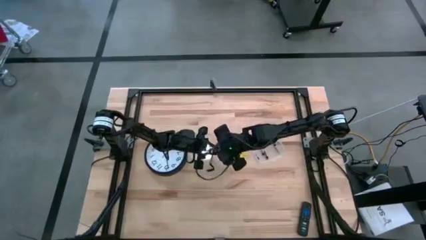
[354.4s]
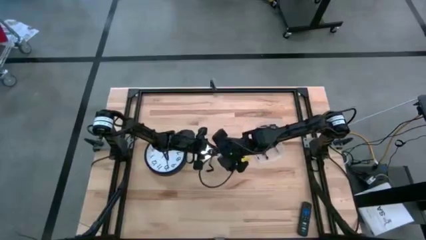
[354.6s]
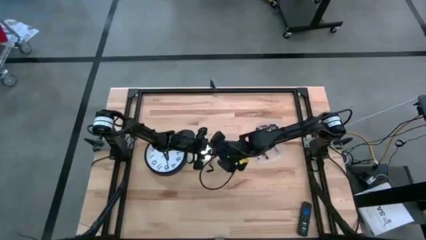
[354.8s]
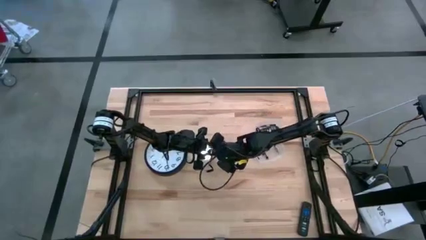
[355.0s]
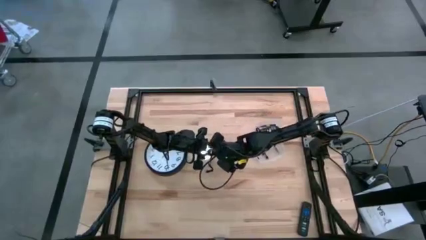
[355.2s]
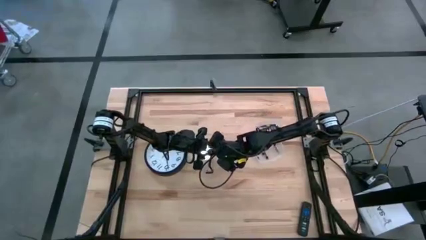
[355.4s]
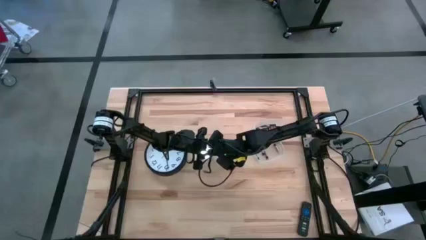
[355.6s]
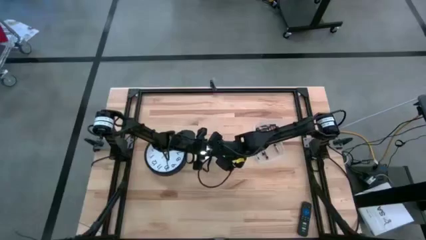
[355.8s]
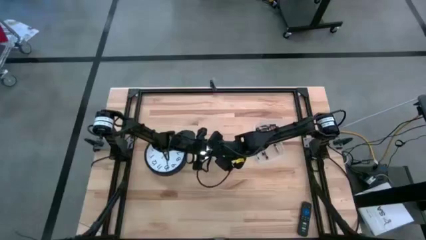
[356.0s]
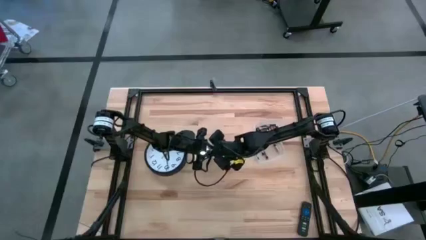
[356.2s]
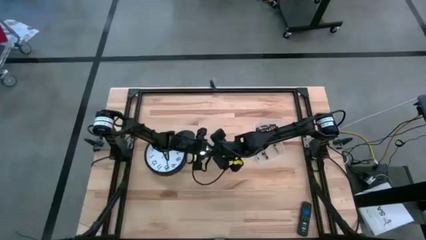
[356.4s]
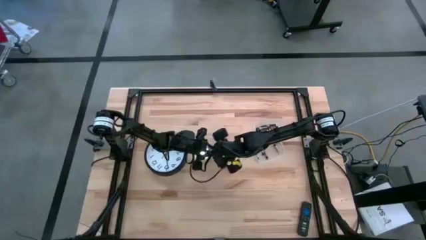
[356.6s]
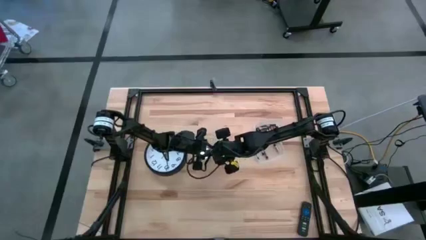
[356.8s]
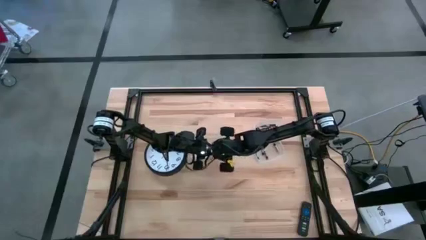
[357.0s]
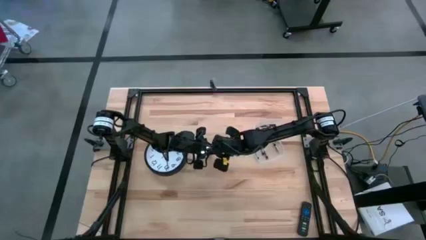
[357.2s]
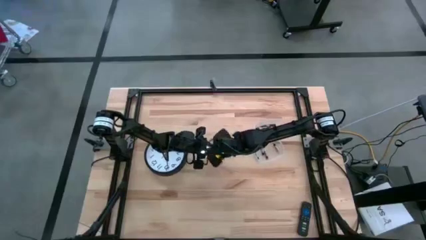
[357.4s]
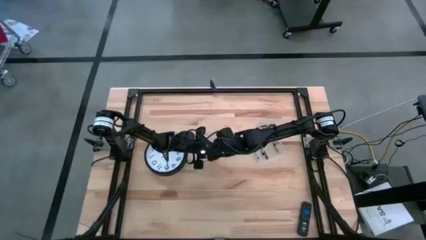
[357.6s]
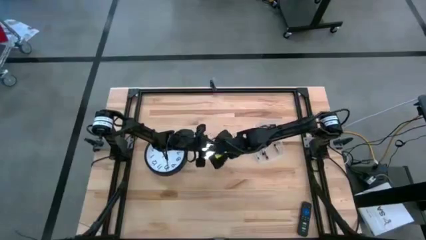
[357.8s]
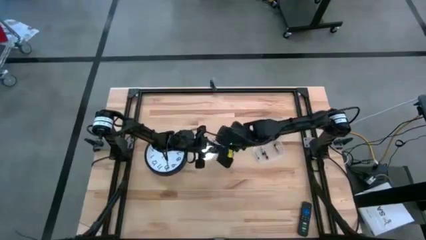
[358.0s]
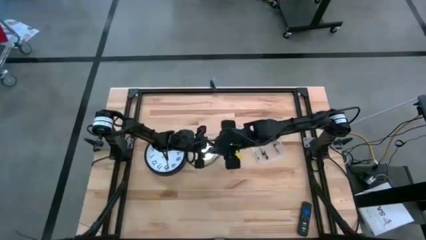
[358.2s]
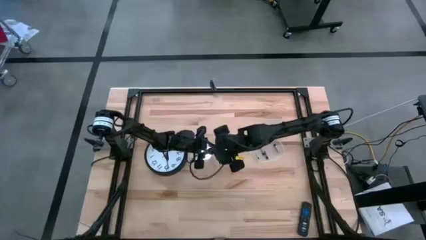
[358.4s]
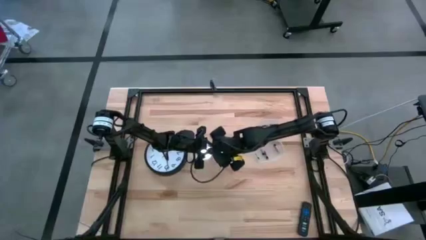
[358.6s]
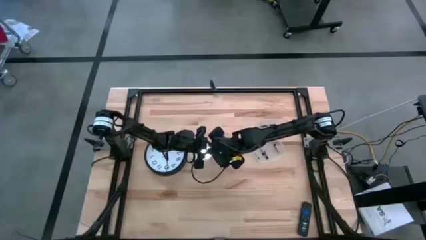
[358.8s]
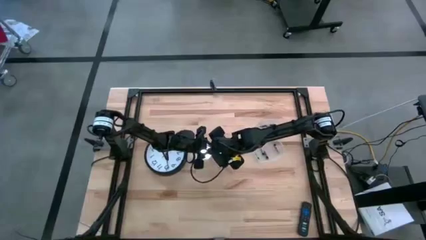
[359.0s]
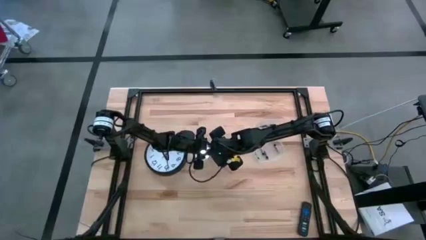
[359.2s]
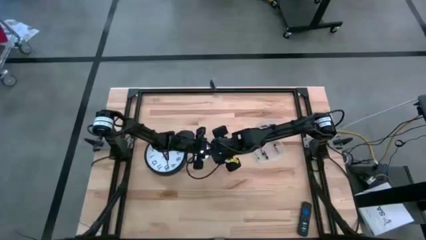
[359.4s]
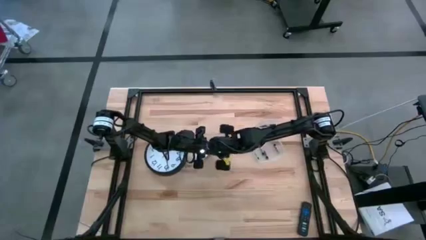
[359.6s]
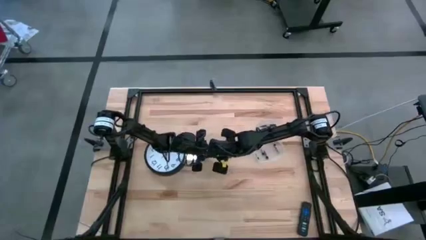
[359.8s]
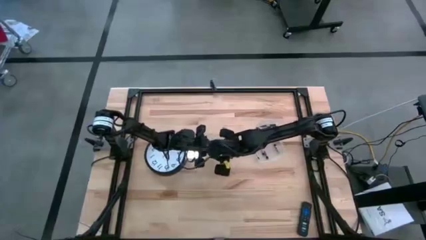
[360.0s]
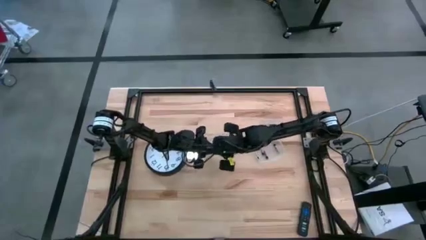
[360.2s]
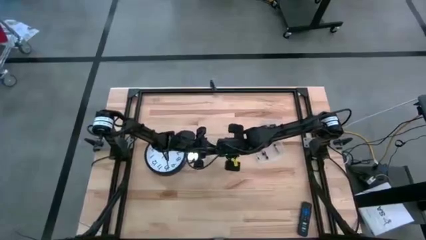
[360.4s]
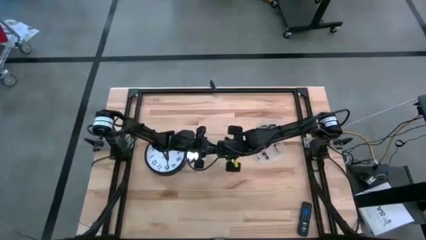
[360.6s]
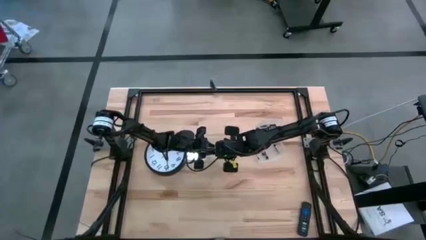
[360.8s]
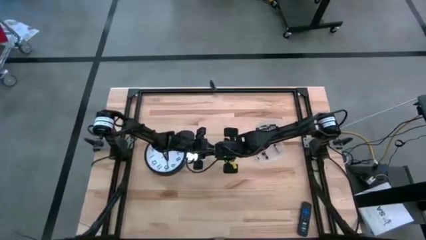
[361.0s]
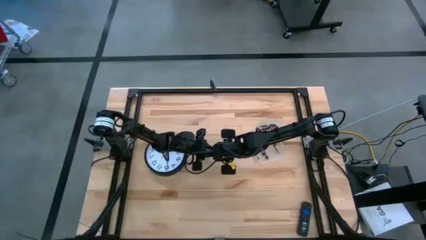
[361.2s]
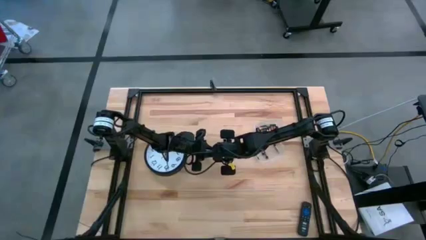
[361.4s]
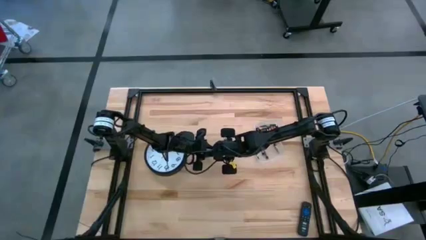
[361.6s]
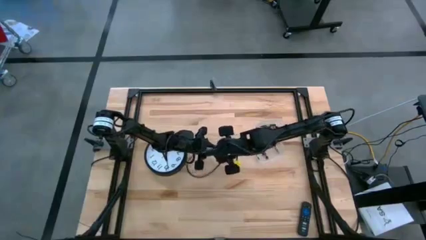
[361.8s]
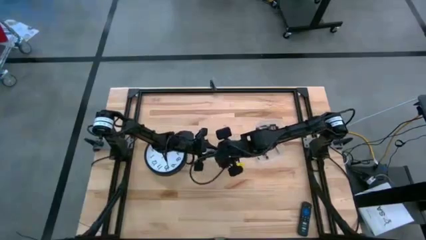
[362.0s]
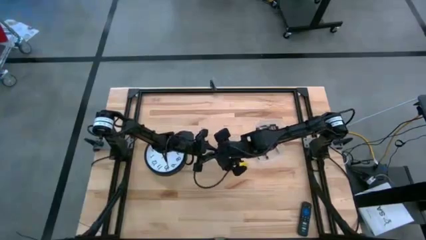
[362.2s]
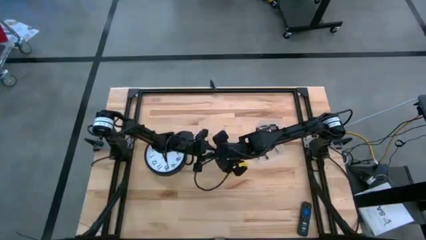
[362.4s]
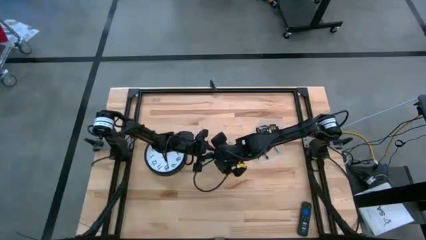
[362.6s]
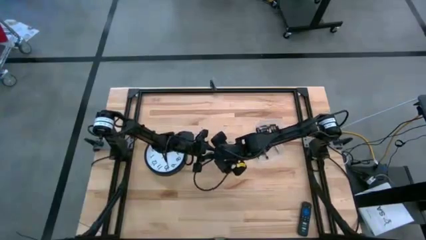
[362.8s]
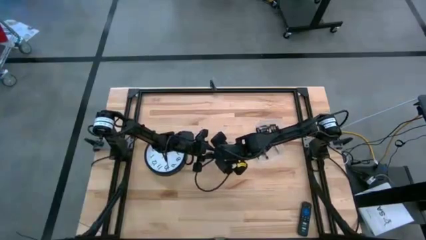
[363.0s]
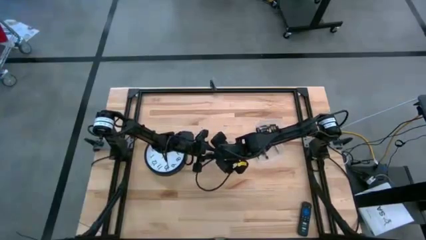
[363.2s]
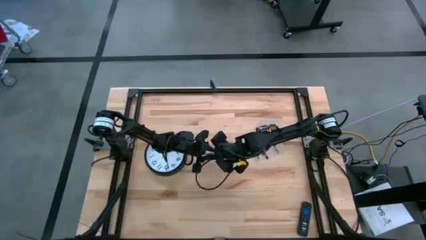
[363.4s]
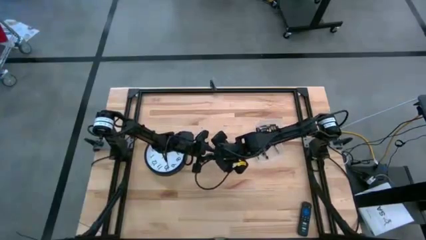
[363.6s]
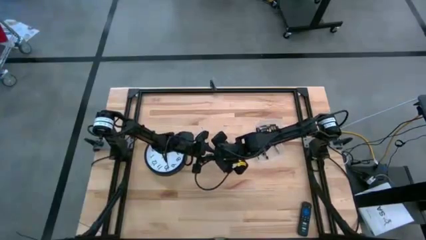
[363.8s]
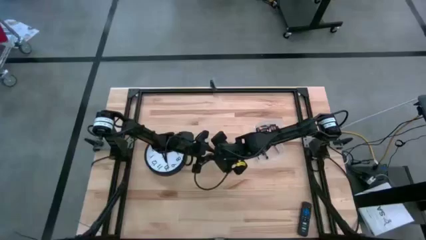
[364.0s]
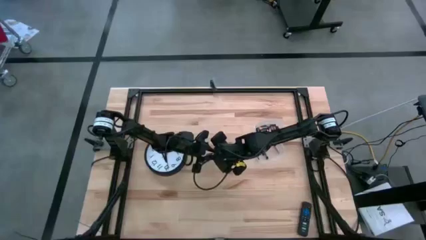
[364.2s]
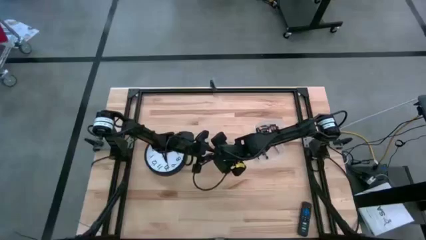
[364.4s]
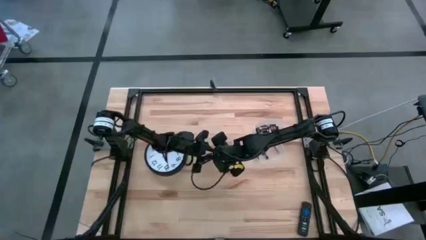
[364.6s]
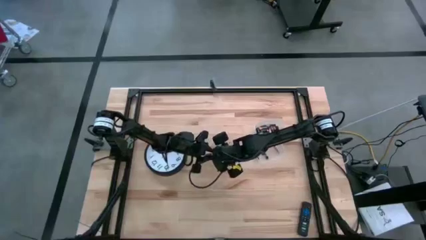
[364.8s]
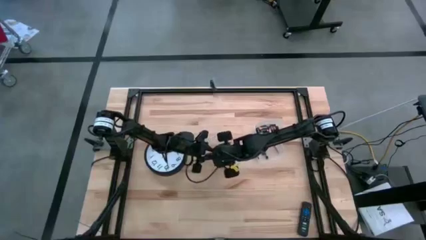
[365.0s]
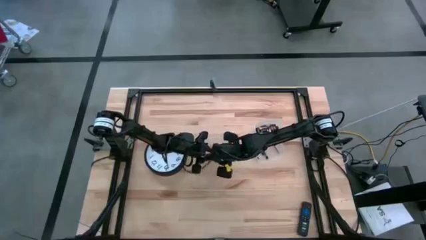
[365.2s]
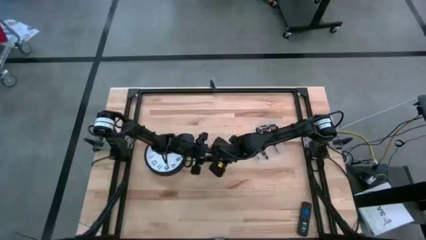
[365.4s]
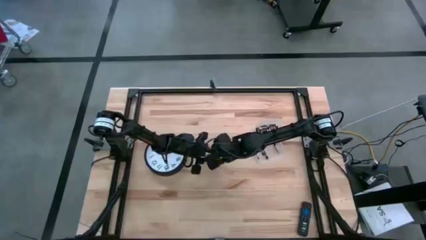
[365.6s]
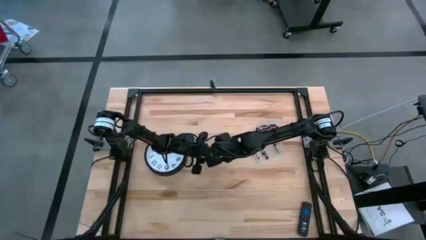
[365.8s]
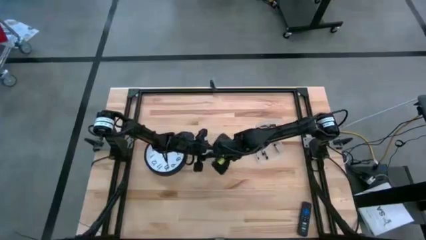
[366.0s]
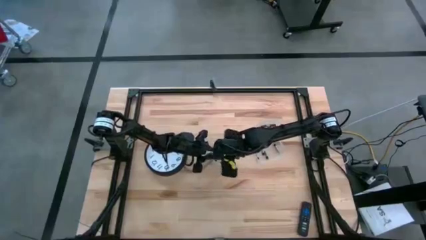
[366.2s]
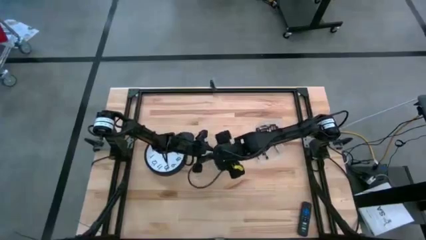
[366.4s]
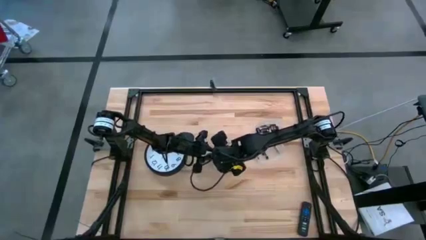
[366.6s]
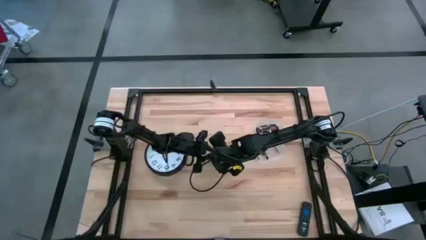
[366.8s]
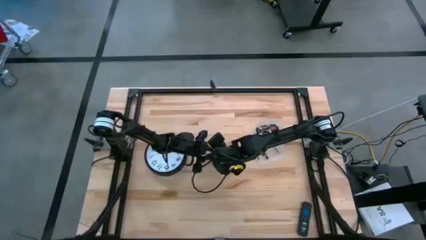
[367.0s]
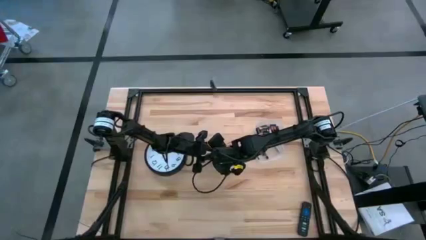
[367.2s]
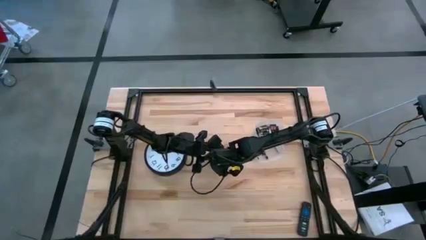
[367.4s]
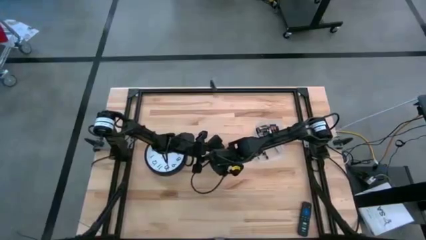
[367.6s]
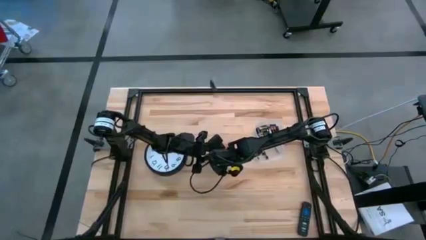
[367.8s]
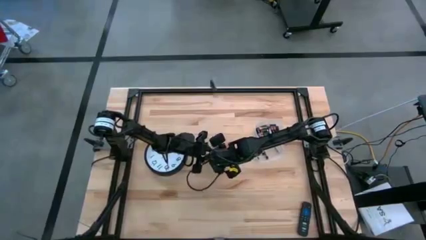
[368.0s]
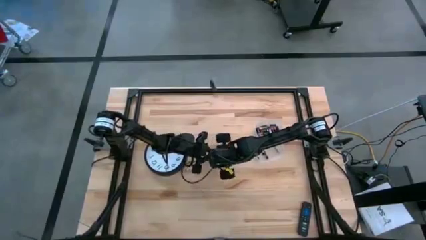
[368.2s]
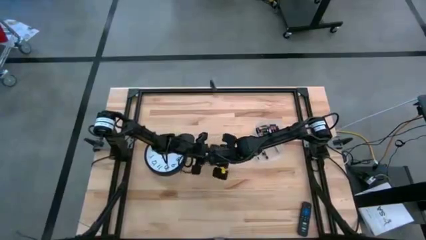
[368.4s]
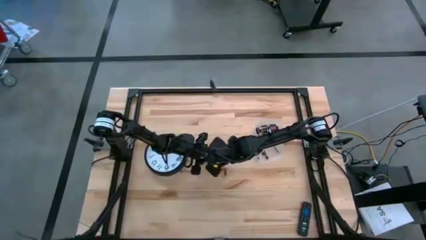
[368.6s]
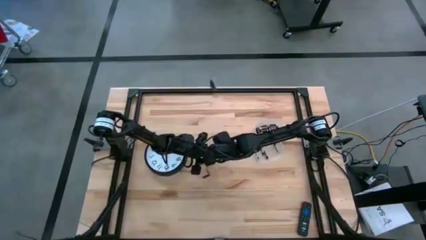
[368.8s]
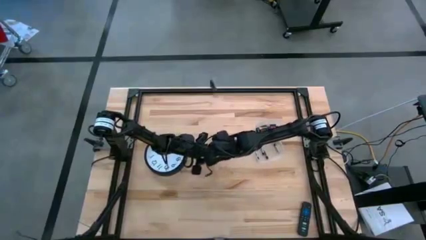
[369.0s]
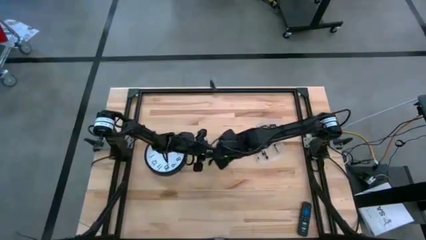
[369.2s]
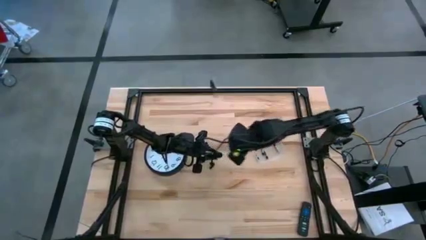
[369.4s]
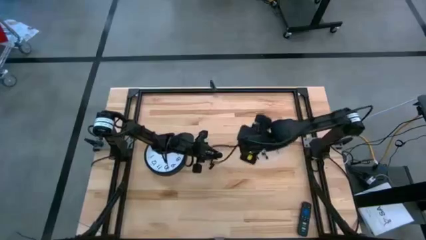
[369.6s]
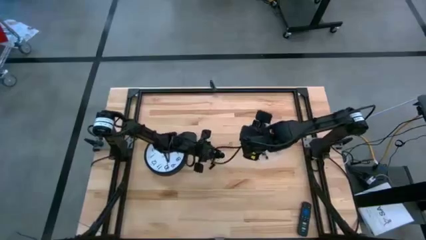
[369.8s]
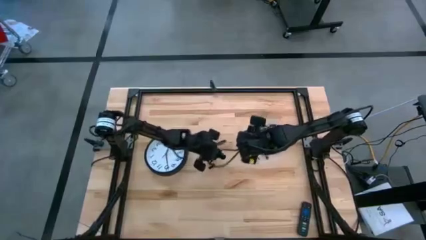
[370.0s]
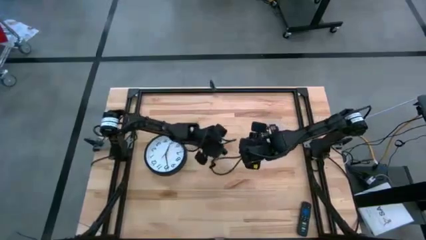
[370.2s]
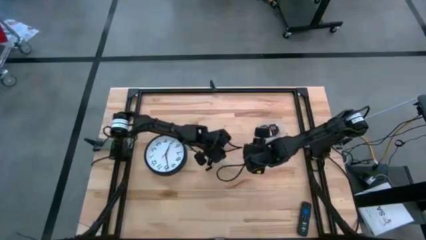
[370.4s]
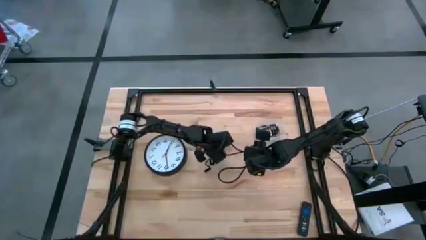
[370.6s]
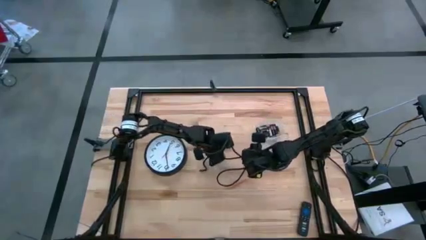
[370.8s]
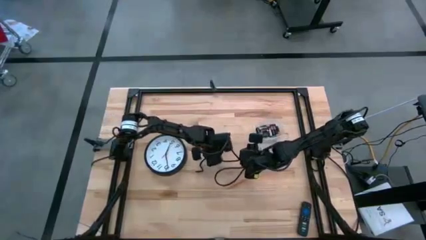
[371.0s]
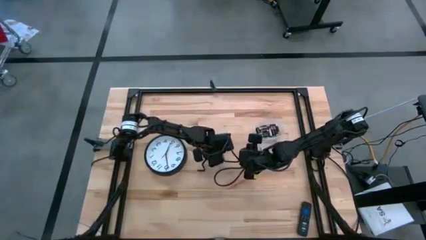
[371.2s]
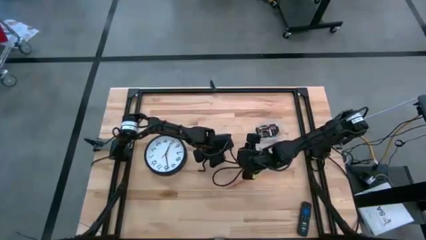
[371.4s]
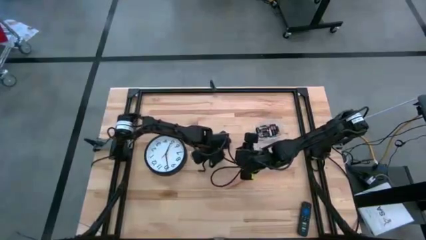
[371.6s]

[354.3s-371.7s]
Task: Insert battery
Close the black battery compartment
